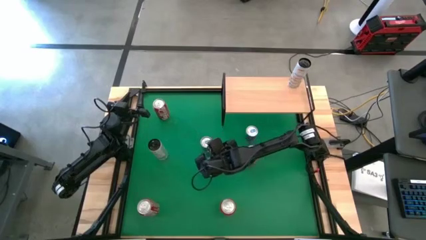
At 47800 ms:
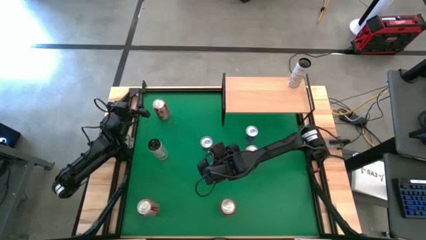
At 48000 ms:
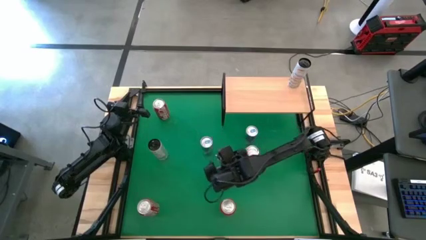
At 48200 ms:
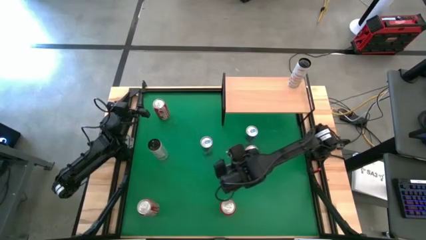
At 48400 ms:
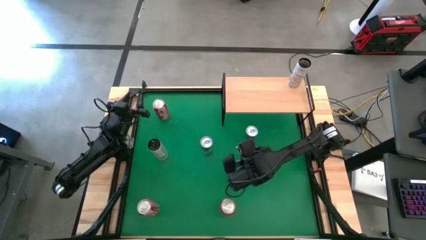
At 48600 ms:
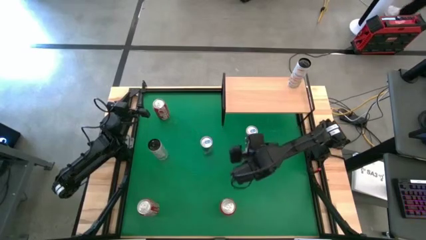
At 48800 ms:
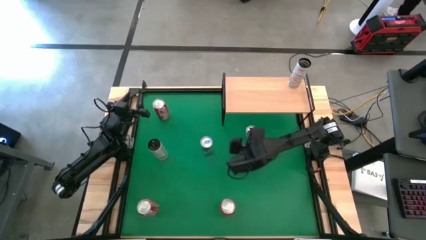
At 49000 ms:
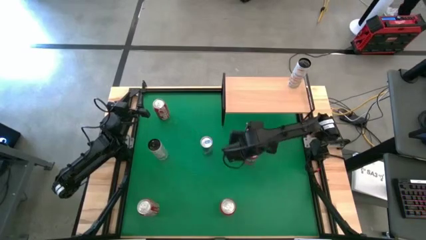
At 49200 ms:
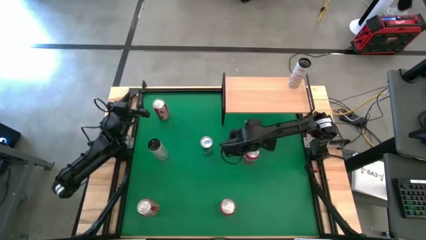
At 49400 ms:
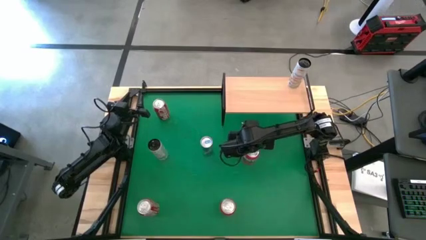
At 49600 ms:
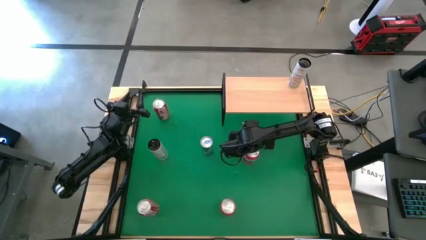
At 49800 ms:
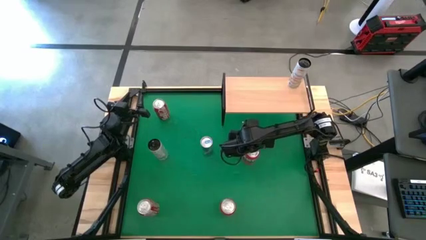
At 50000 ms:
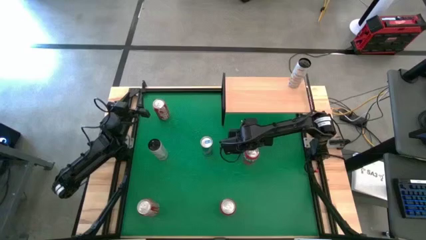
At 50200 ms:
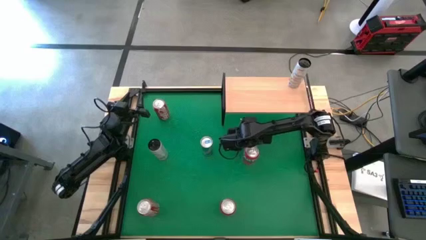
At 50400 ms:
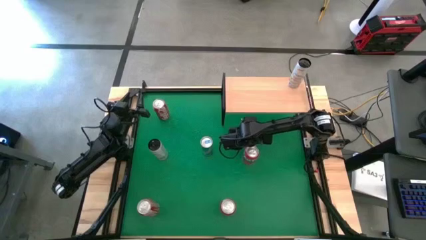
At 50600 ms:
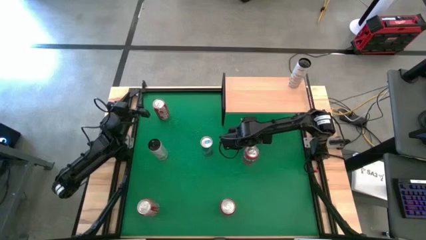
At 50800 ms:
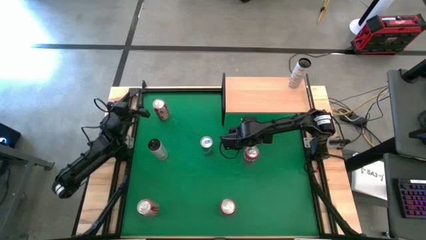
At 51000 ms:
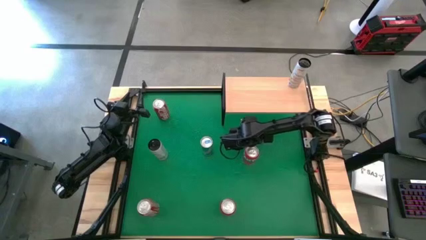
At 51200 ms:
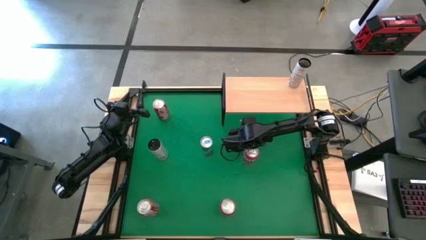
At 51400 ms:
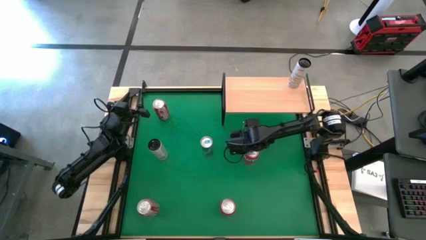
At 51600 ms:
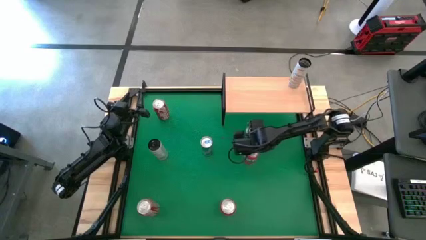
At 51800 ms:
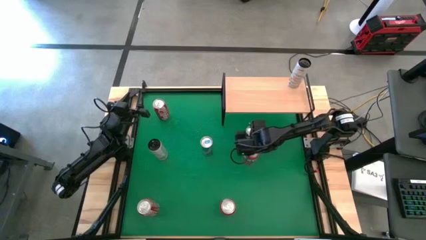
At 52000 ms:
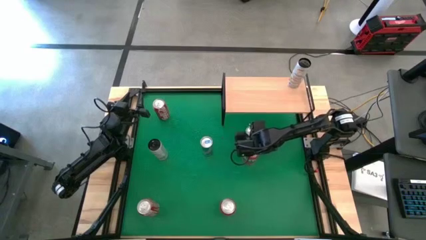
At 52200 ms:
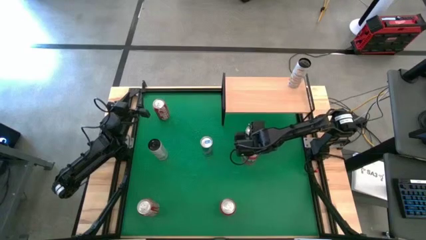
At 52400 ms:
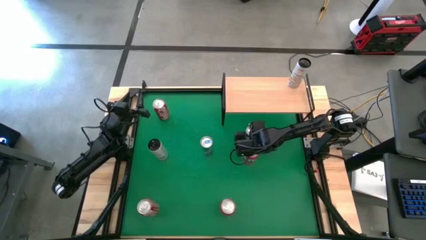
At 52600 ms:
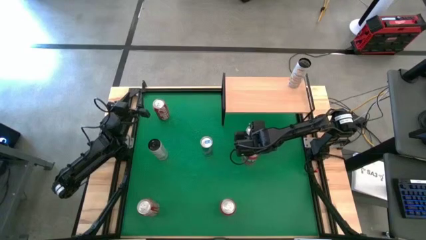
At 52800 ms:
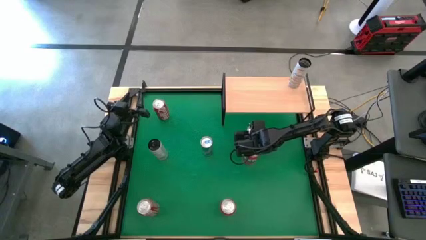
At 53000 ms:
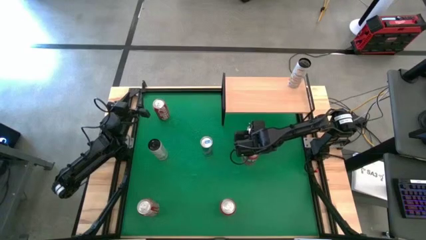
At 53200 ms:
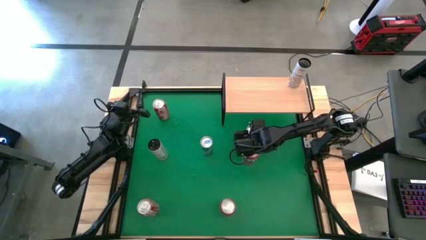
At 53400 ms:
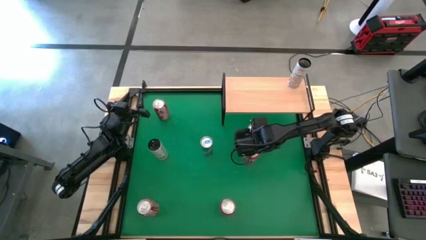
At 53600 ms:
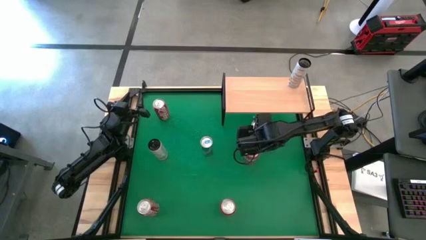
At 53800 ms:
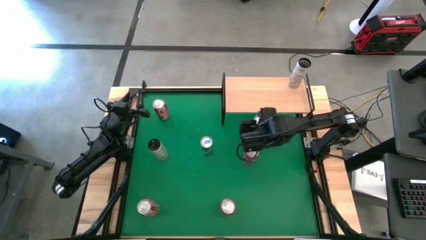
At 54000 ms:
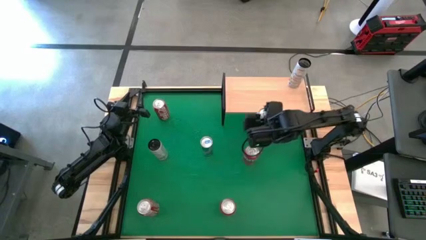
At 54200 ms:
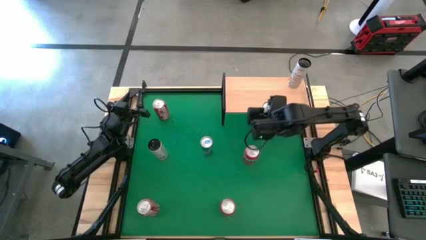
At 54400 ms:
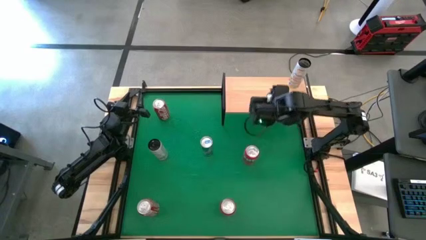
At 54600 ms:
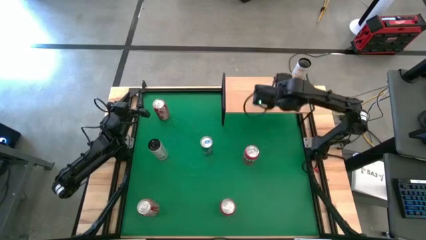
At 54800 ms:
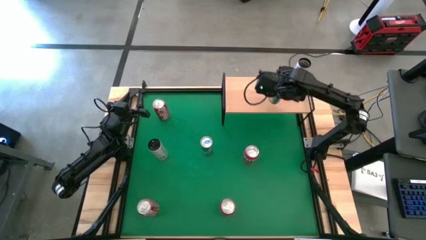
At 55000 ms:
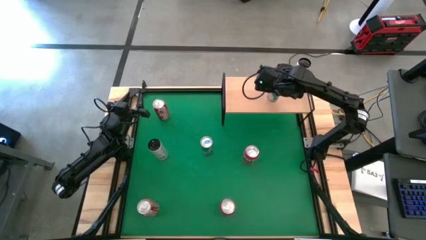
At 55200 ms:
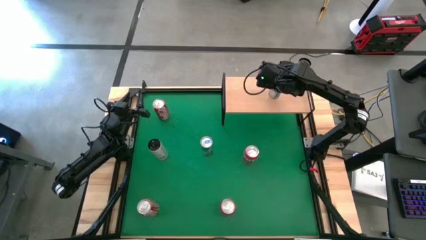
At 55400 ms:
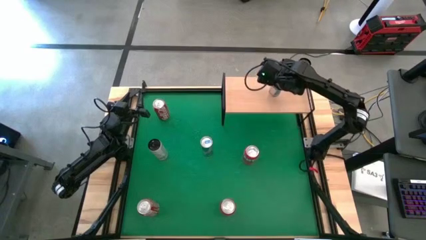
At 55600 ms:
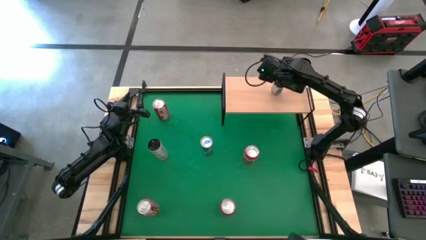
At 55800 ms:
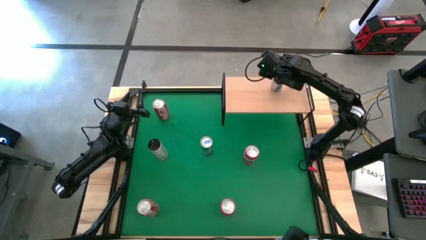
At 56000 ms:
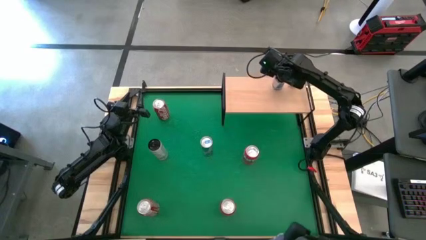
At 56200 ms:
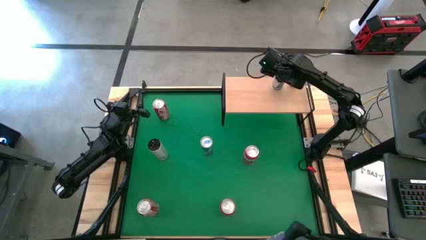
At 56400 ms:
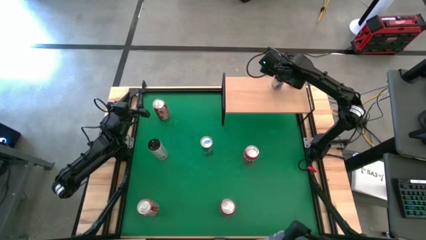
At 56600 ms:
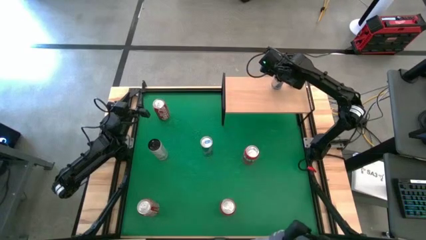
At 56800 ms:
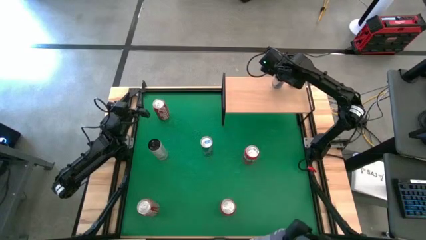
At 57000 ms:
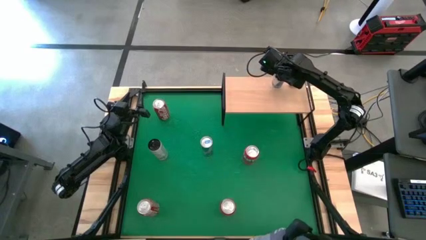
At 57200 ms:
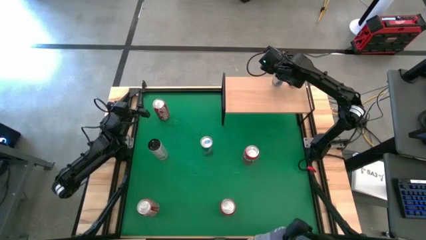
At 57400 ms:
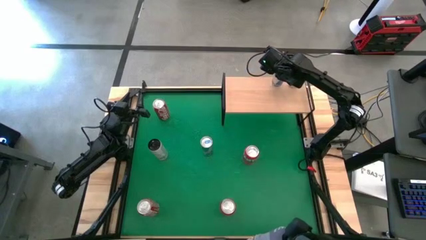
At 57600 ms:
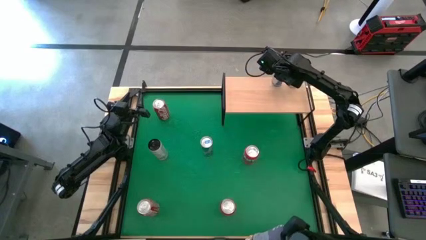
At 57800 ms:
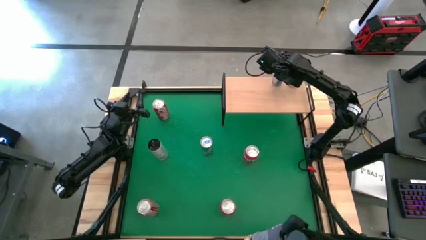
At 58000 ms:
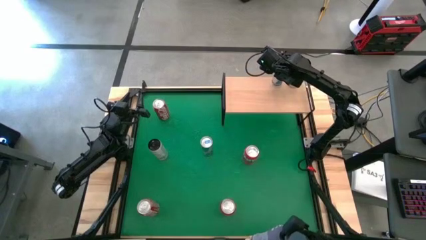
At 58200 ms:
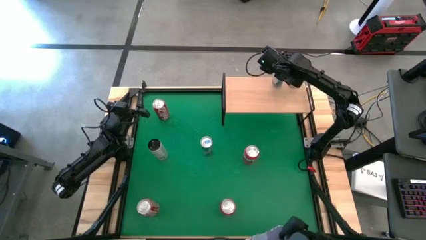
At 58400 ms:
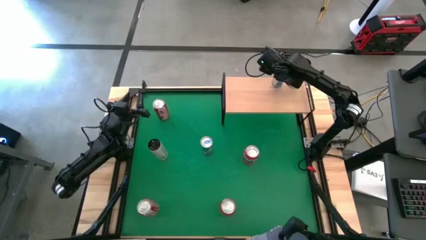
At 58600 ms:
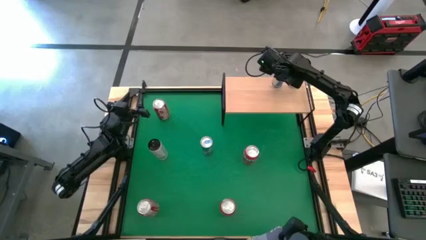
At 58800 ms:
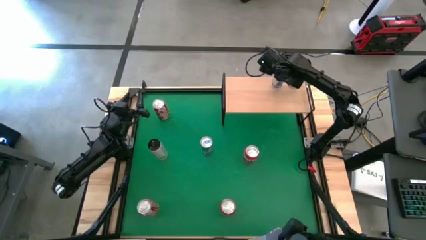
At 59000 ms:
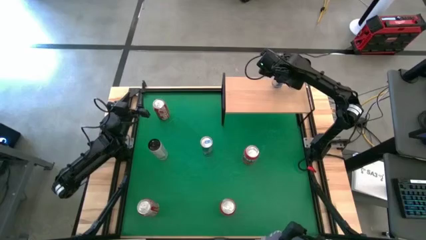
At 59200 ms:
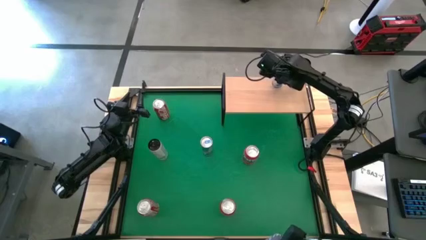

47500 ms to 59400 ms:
Task: Place canned beverage on shelf
Put the top blue soda can on the shelf

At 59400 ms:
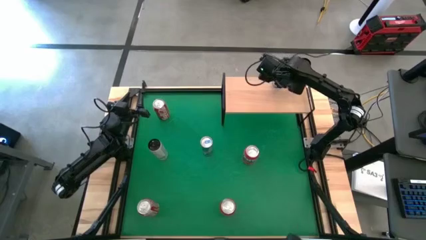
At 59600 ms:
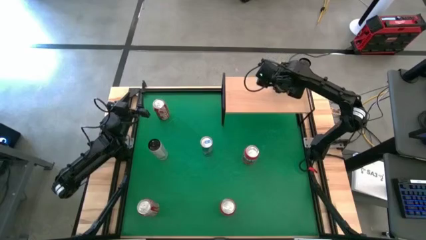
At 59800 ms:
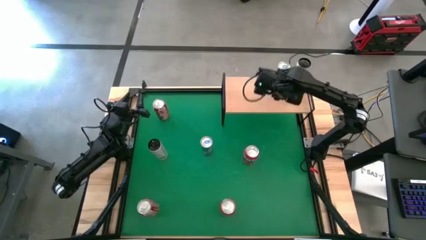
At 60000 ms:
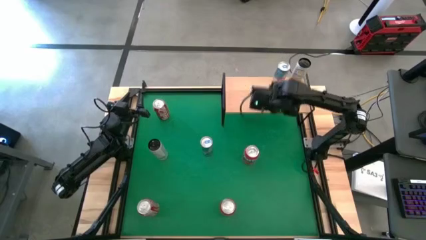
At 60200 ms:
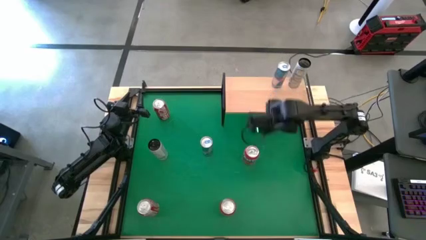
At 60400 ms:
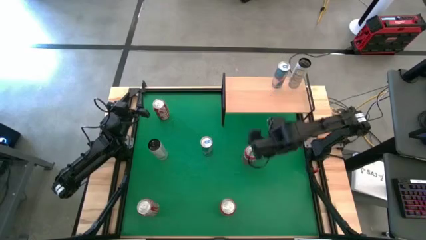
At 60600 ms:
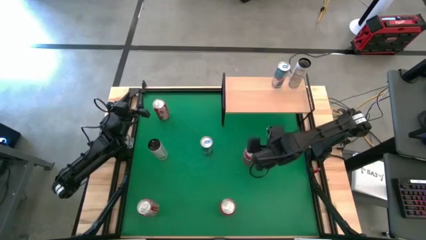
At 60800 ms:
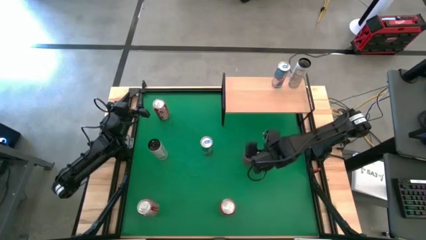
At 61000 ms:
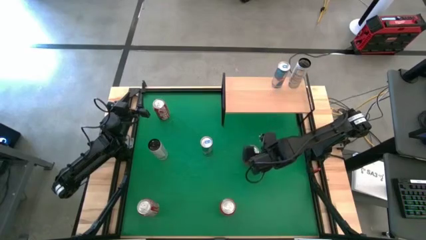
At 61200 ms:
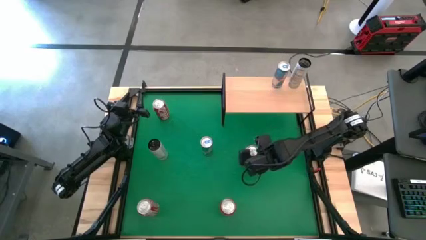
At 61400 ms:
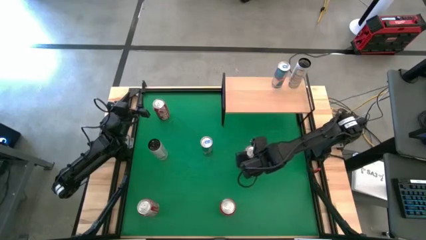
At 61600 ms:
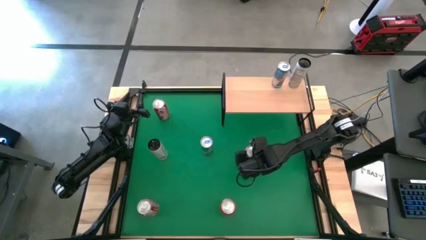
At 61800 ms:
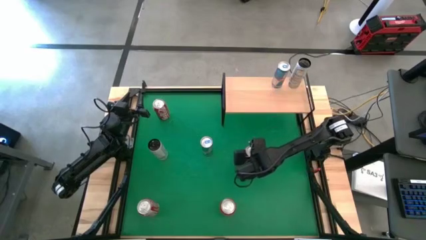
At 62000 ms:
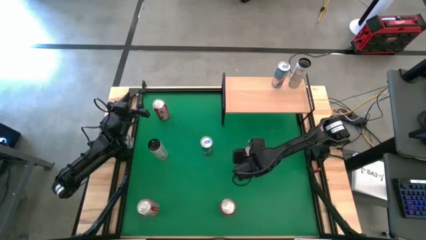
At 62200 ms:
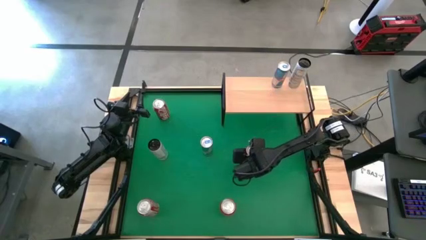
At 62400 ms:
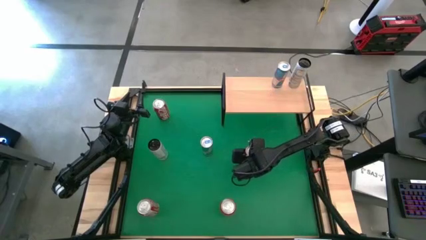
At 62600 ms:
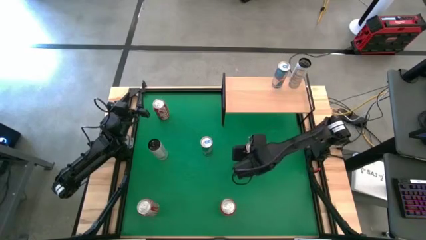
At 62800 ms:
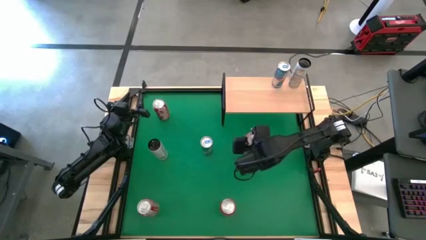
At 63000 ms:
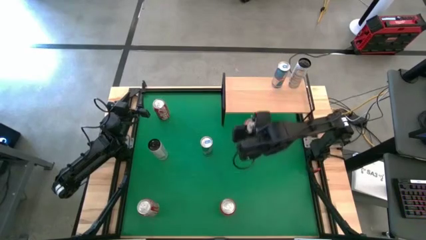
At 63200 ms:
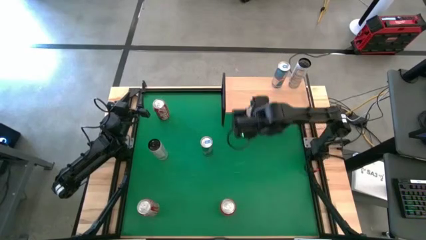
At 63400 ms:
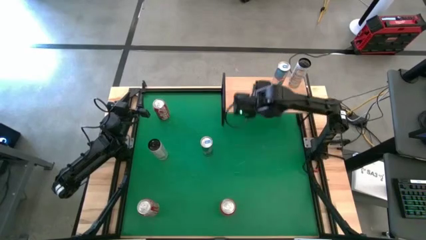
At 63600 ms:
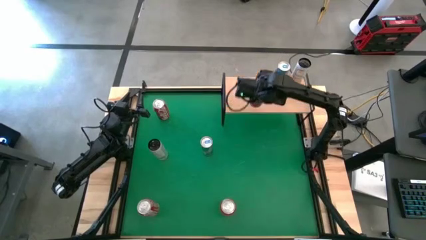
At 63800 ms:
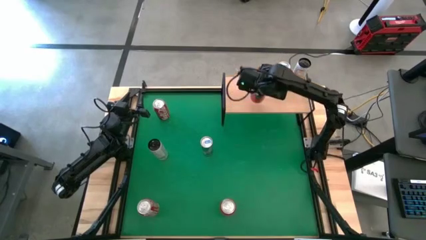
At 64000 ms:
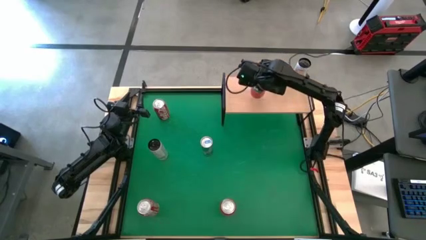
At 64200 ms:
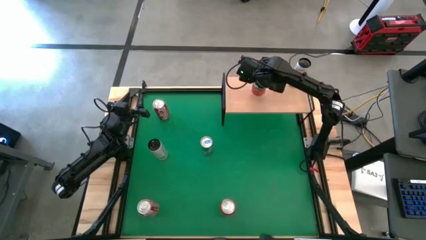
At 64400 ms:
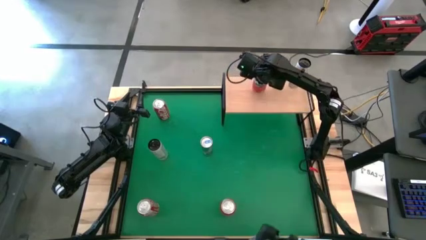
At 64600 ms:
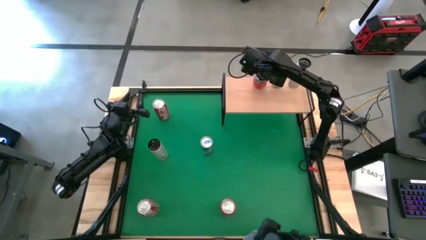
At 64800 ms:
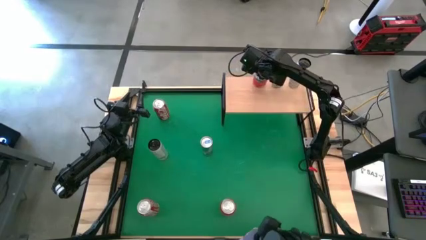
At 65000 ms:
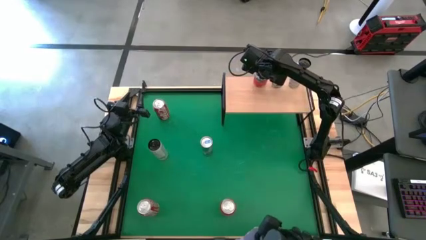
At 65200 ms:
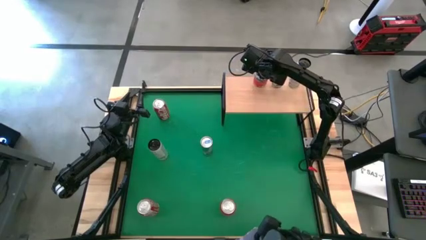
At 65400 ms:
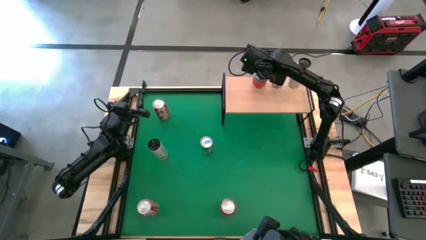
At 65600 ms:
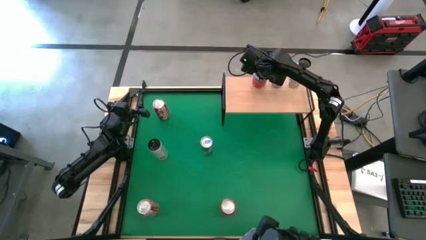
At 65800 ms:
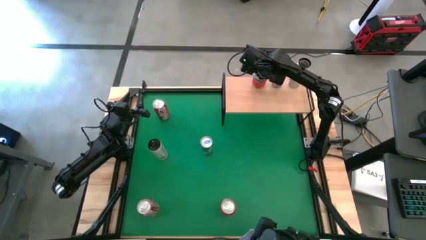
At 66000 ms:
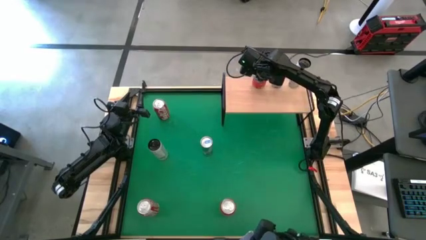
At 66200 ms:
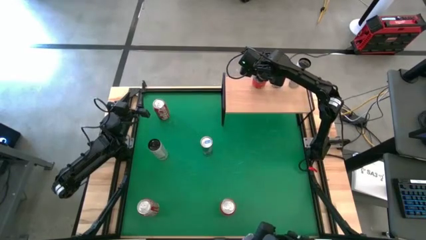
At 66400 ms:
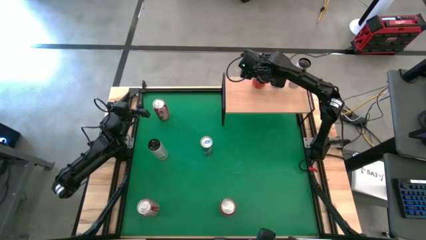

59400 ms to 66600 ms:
Put the top red soda can on the shelf
